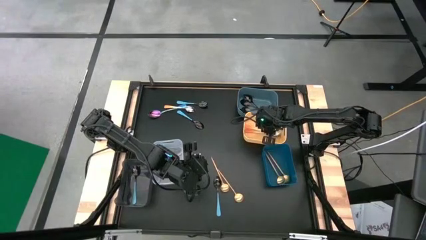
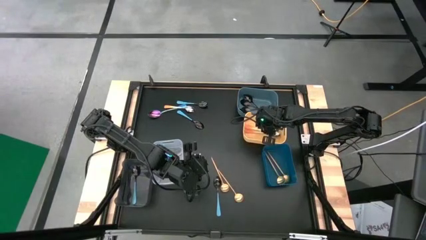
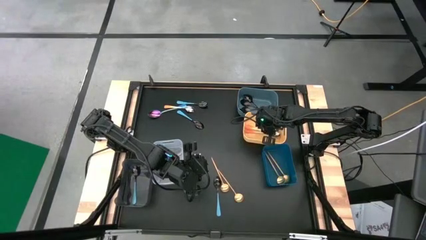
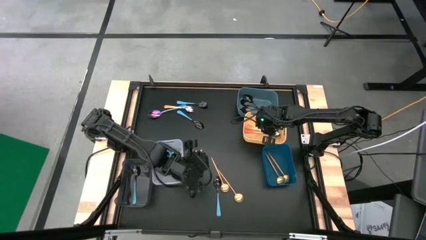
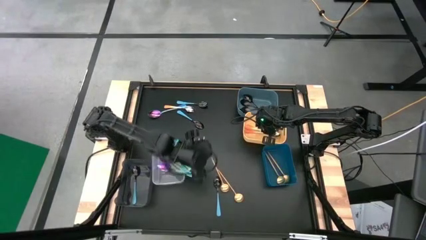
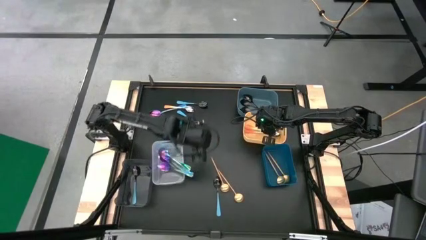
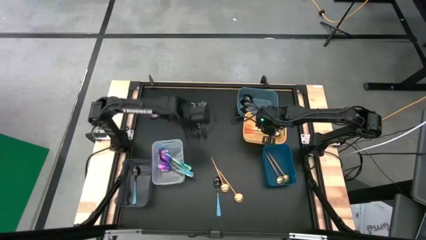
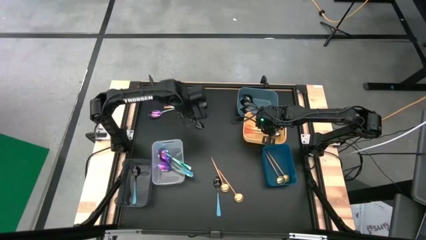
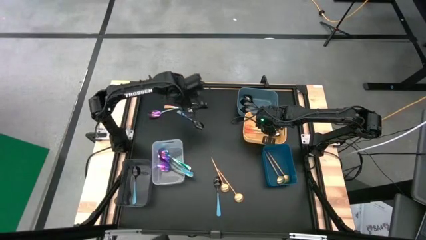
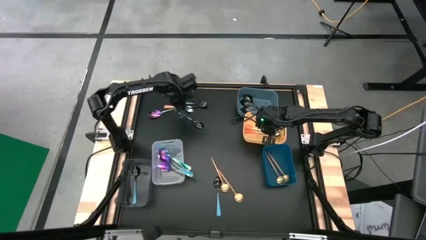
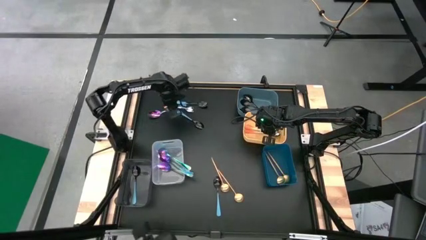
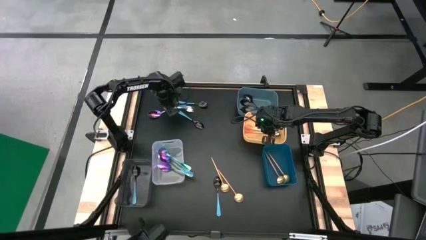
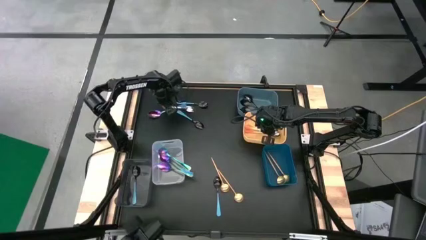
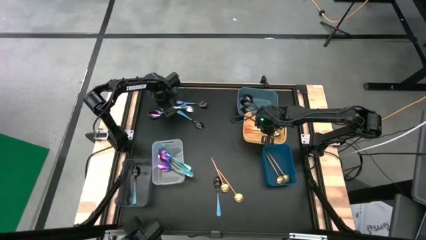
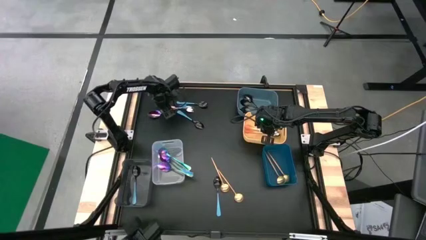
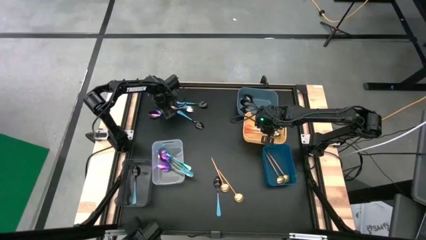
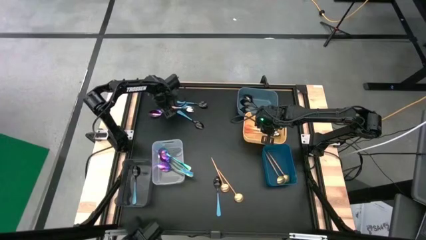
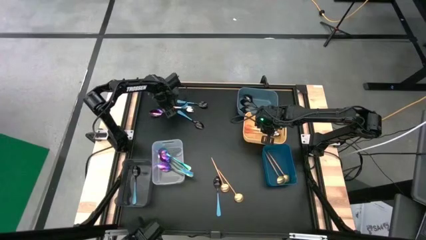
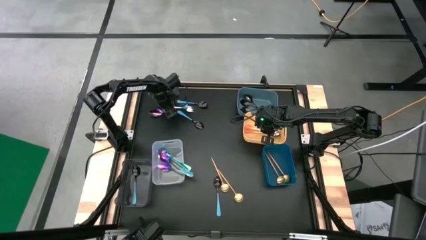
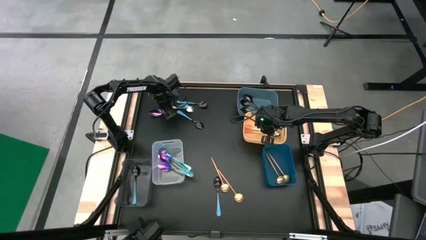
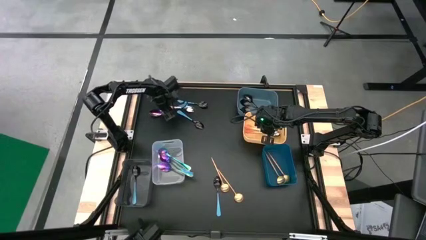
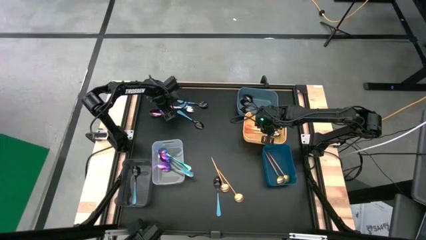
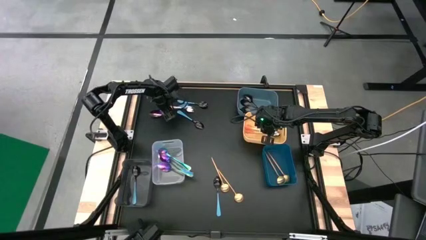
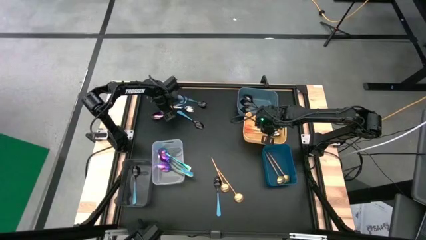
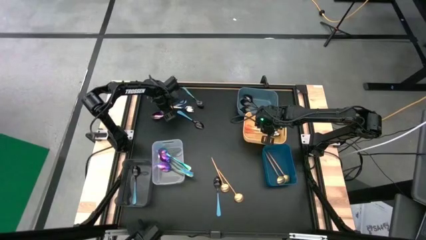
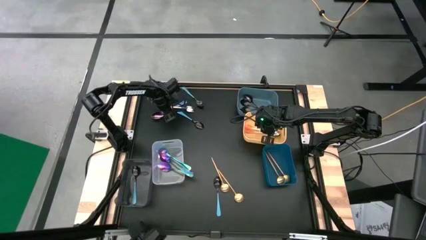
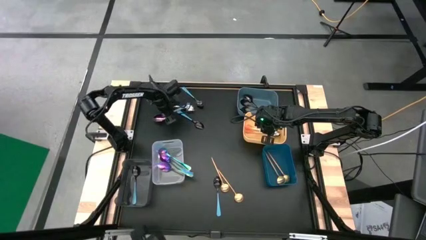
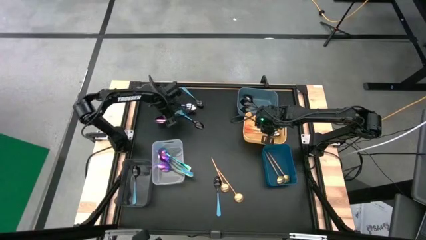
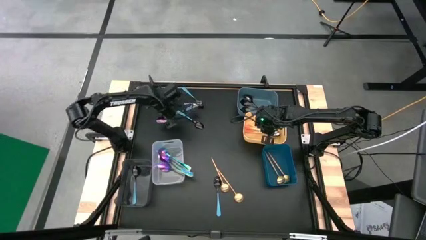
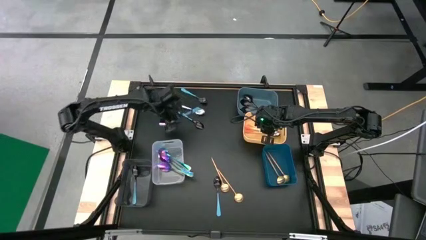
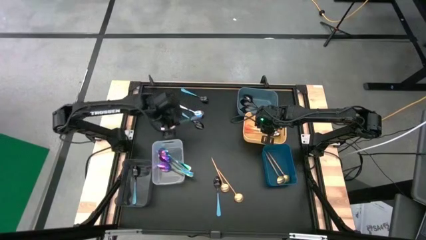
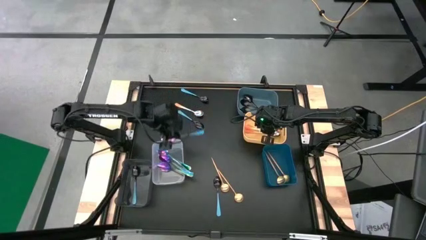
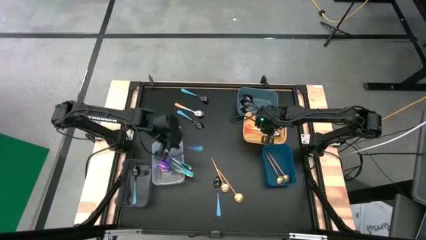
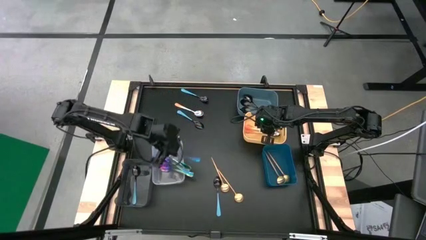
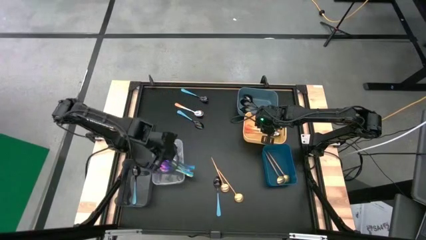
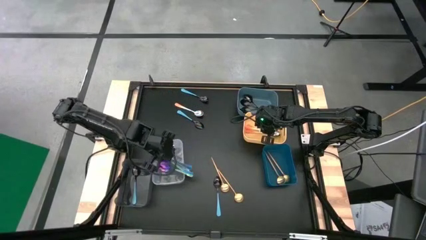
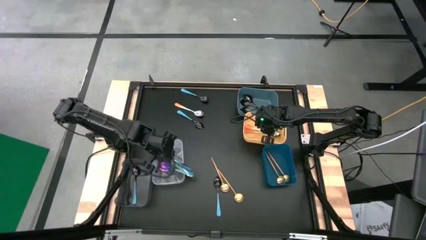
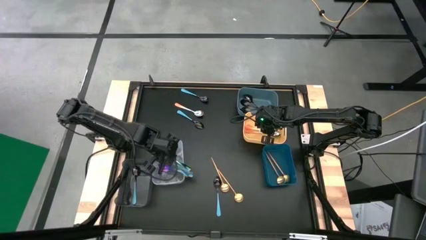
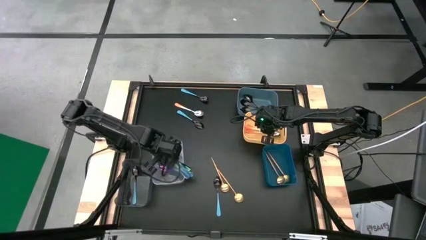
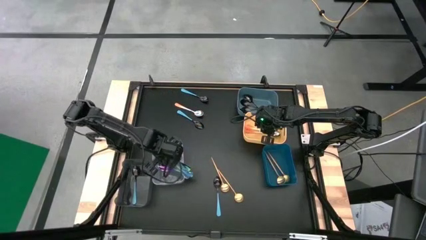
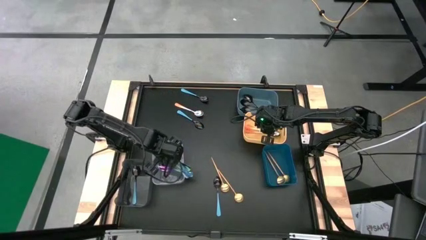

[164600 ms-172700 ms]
Task: Sort silverware by color (type)
Put the purple spoon into the transparent bin

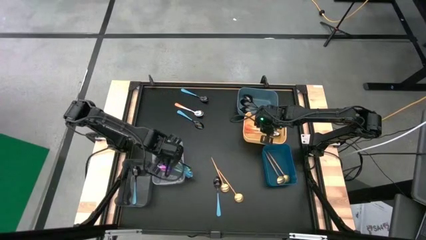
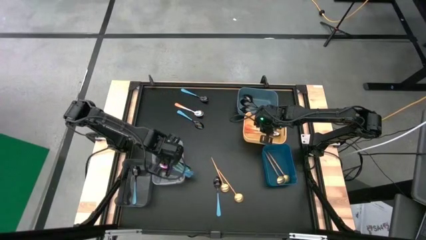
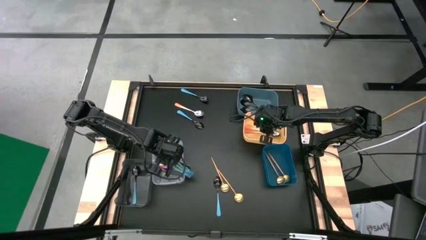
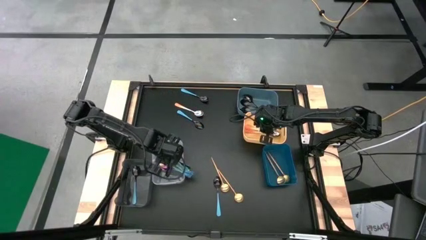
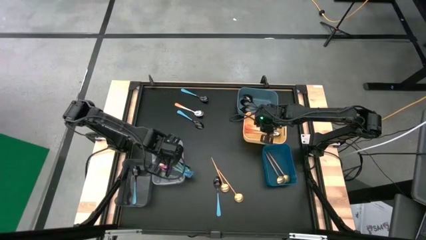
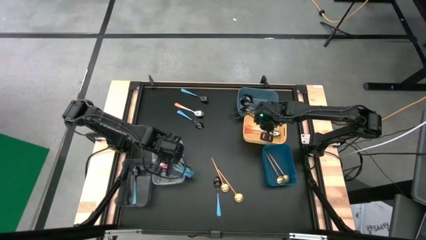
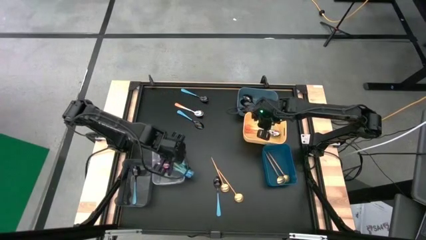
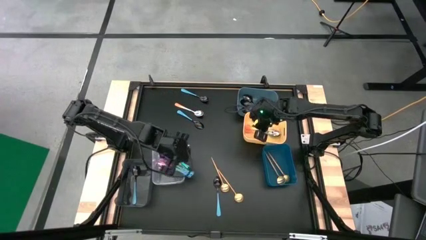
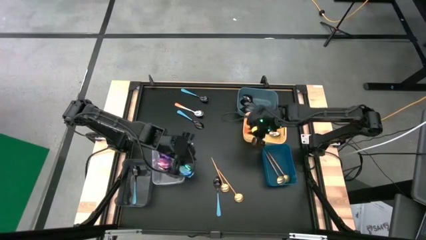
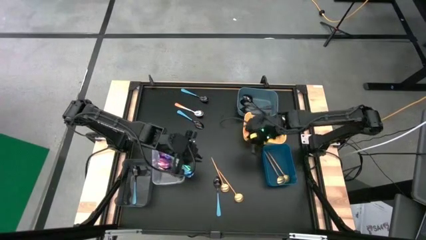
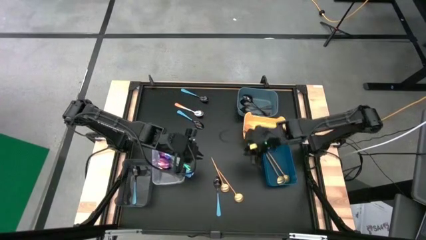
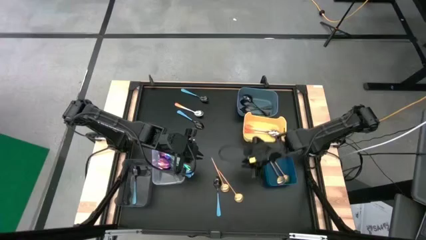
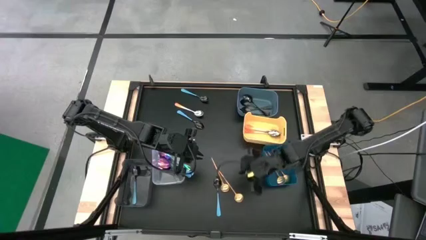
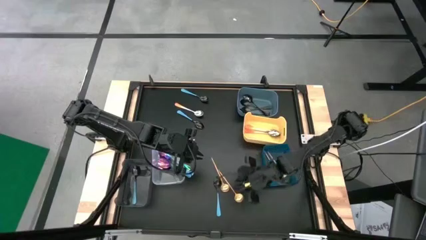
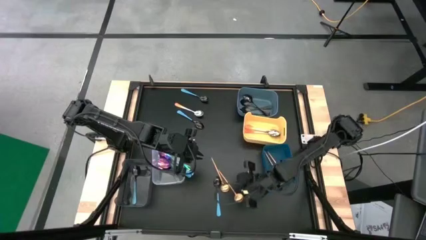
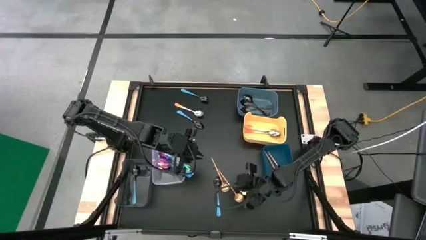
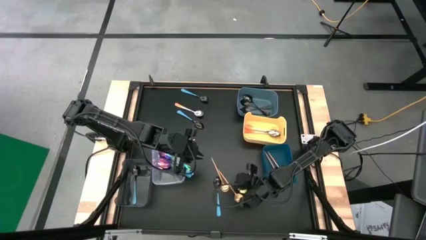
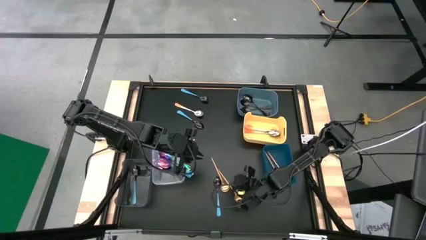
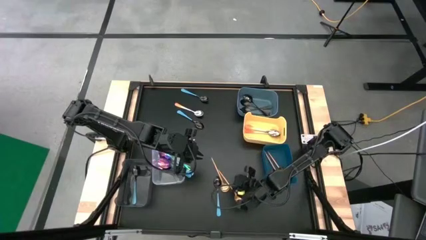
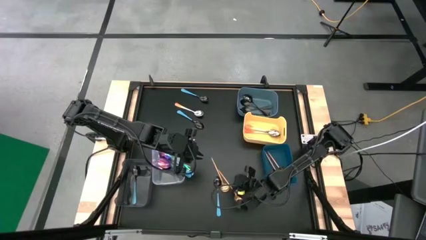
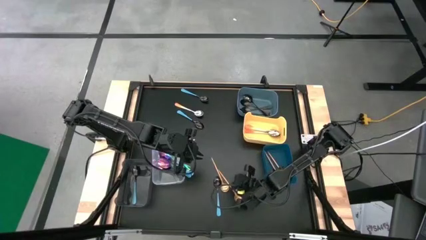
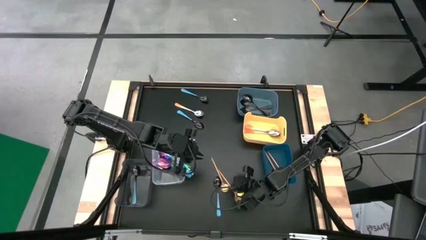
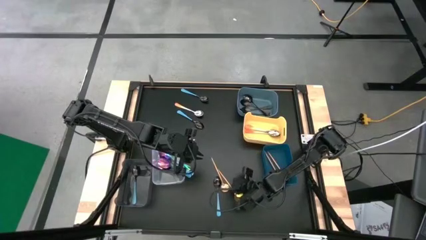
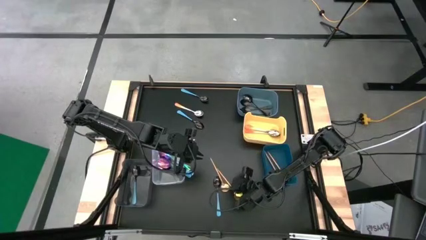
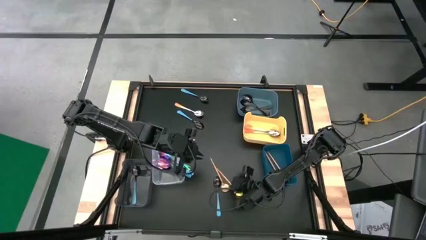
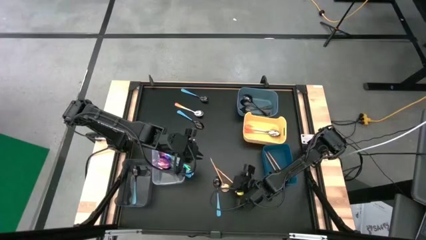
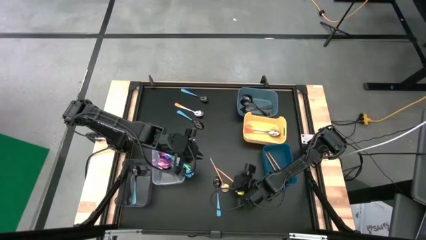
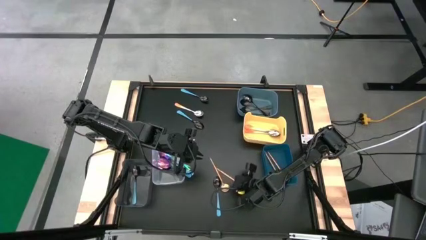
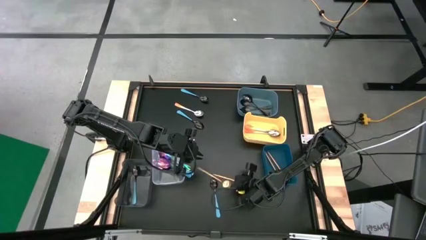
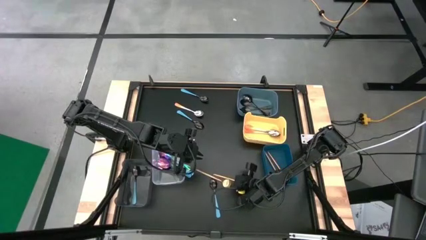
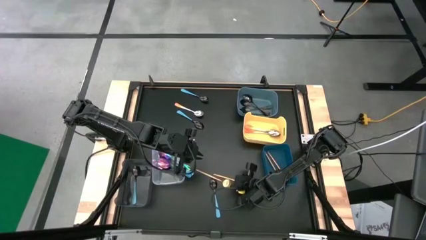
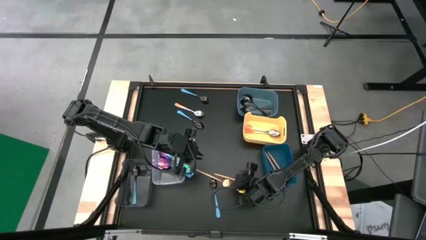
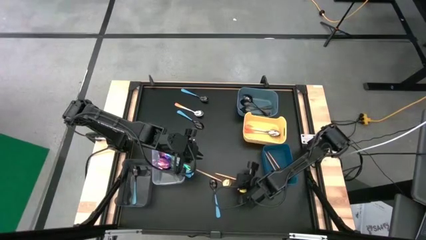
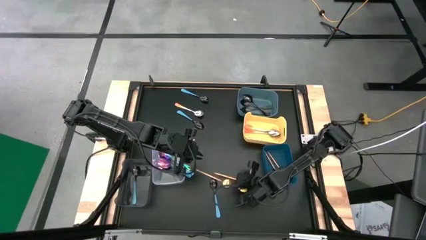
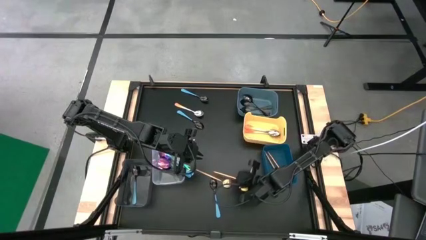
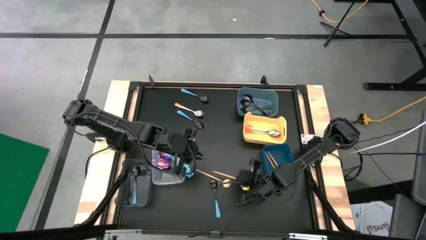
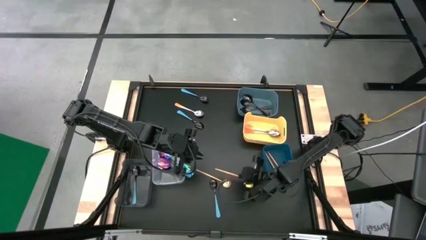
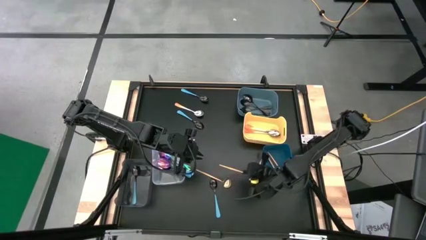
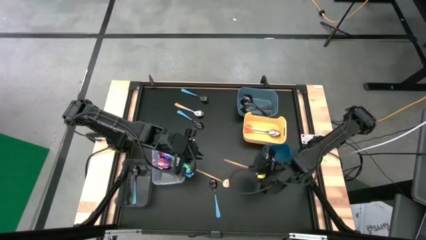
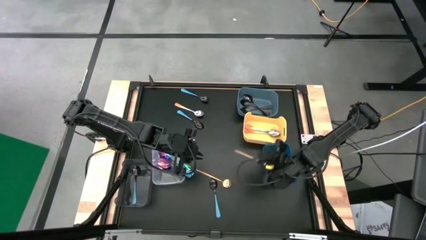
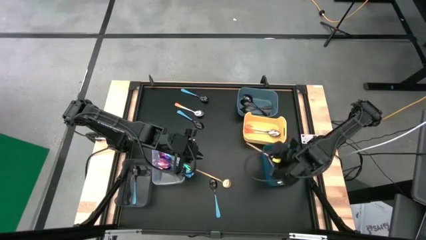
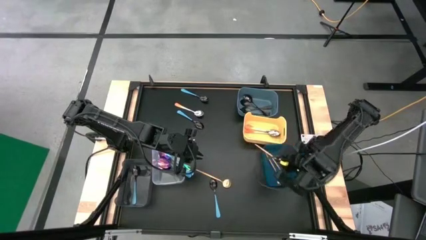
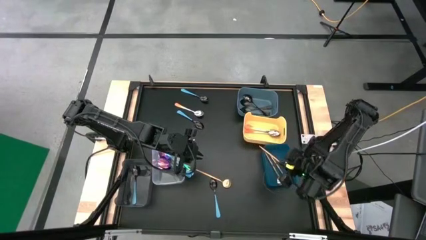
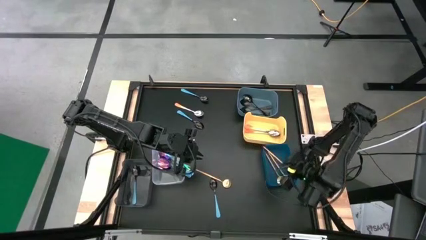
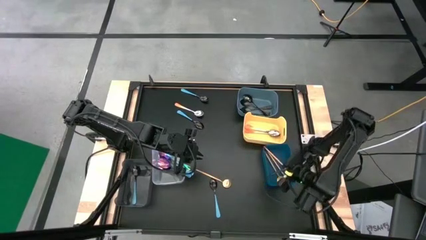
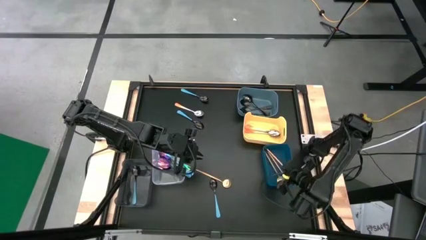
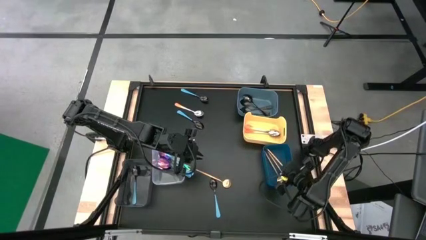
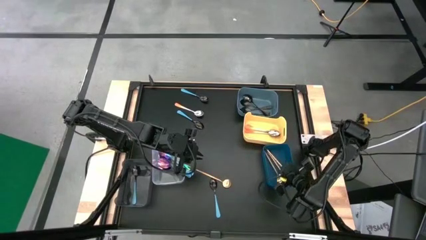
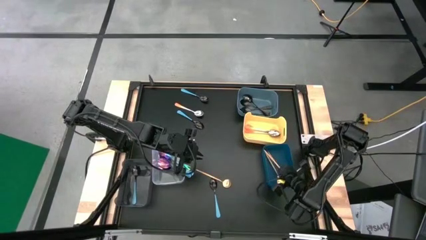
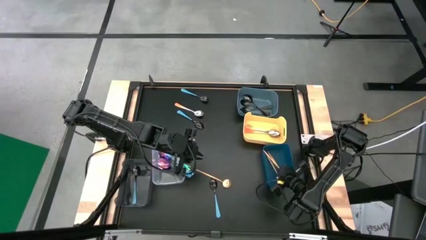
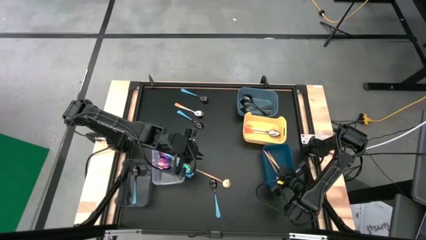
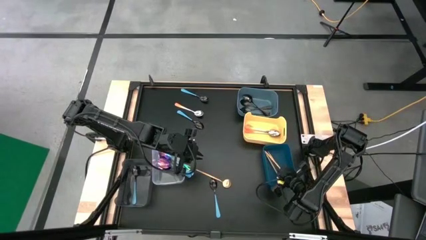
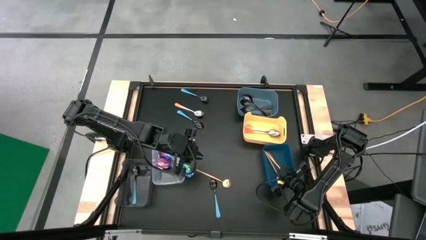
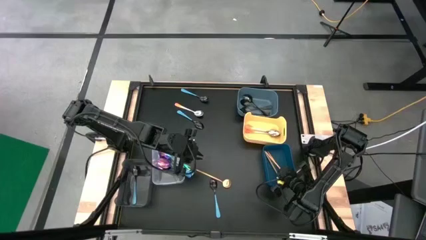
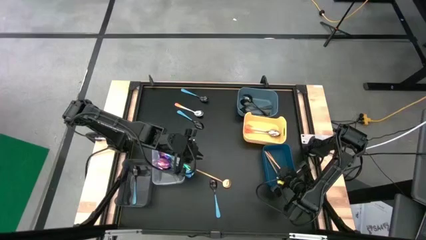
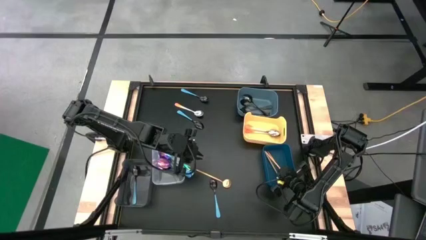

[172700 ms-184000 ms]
Put the yellow spoon into the blue bin
